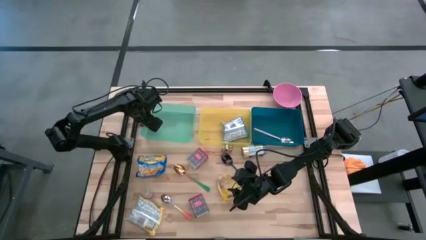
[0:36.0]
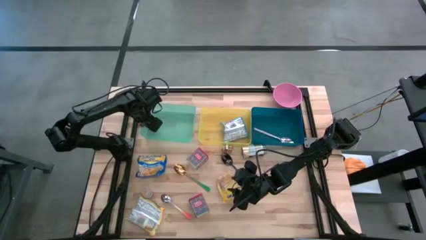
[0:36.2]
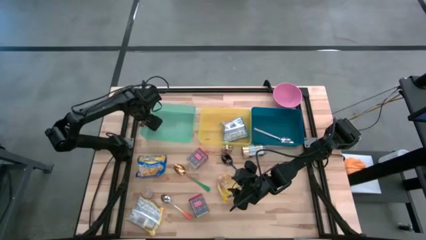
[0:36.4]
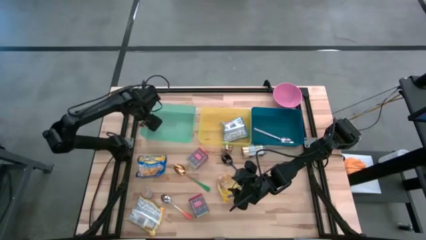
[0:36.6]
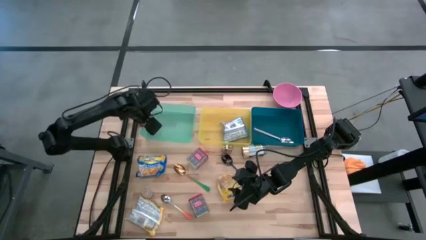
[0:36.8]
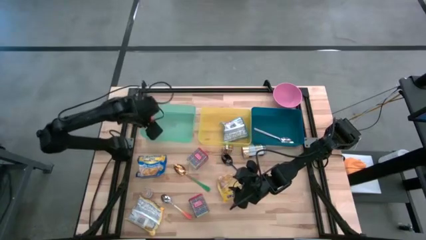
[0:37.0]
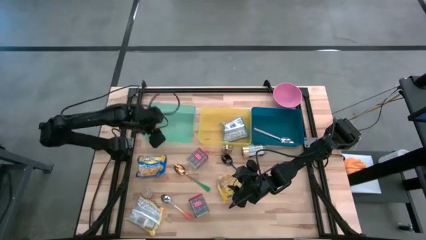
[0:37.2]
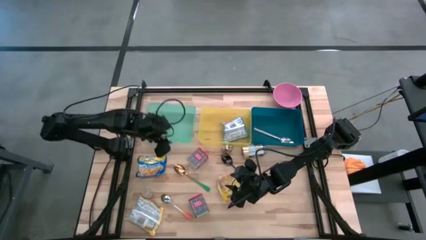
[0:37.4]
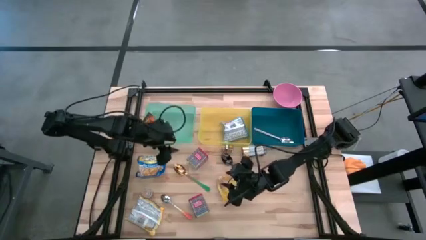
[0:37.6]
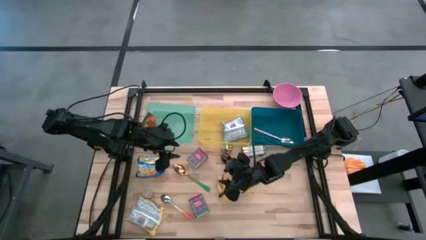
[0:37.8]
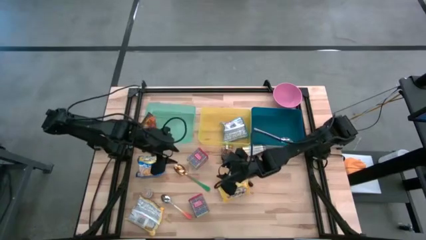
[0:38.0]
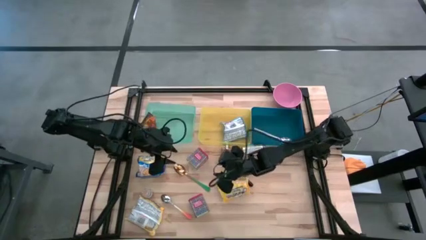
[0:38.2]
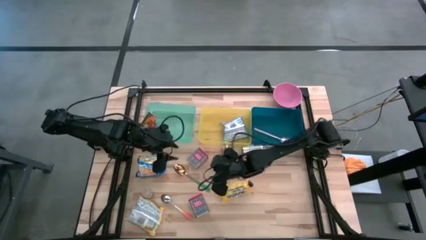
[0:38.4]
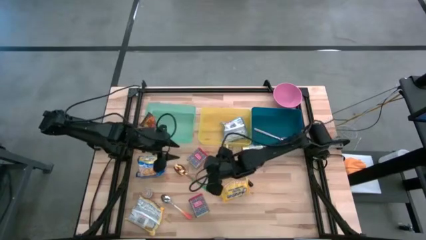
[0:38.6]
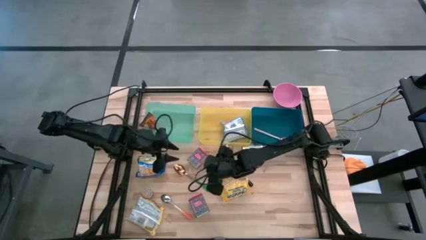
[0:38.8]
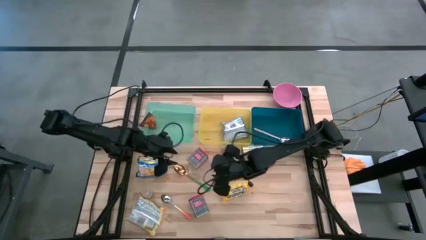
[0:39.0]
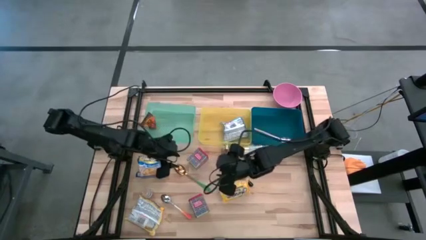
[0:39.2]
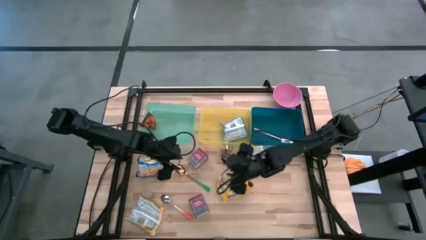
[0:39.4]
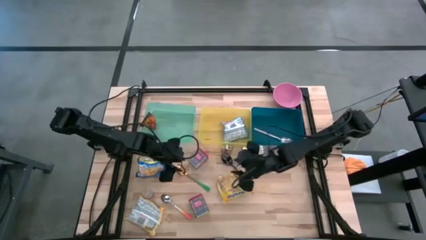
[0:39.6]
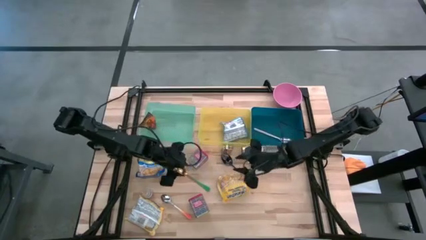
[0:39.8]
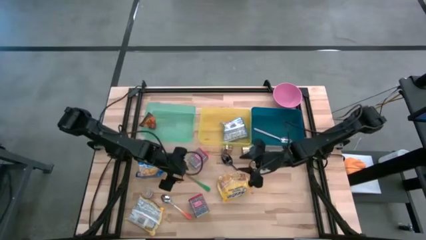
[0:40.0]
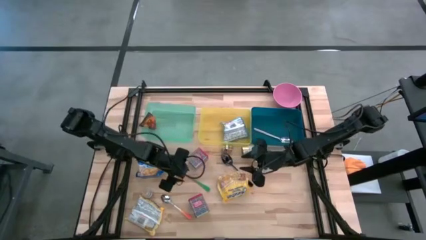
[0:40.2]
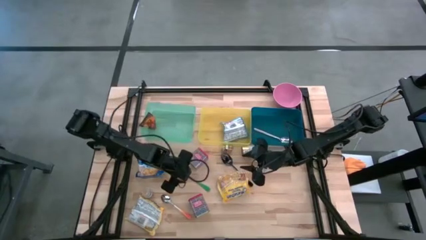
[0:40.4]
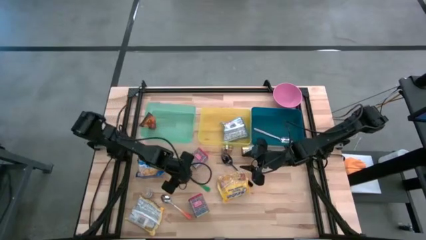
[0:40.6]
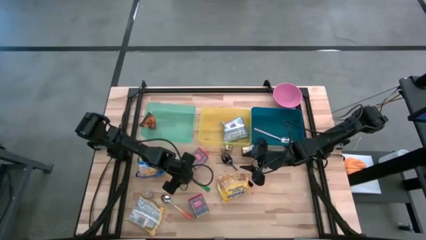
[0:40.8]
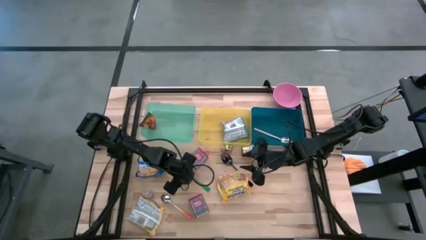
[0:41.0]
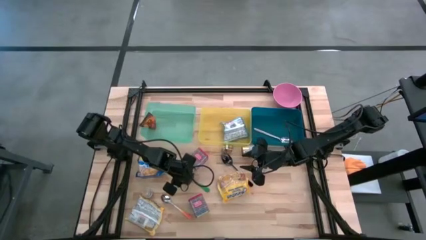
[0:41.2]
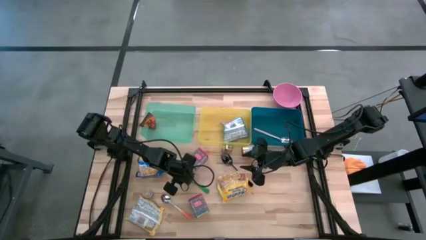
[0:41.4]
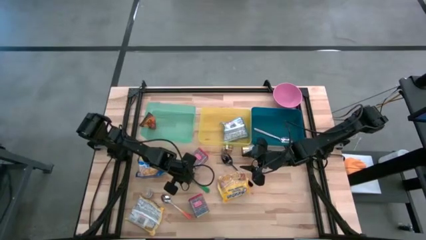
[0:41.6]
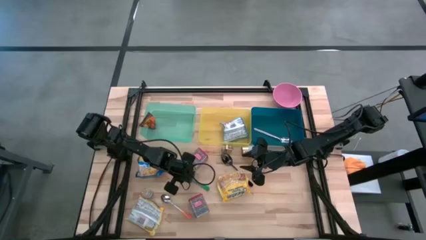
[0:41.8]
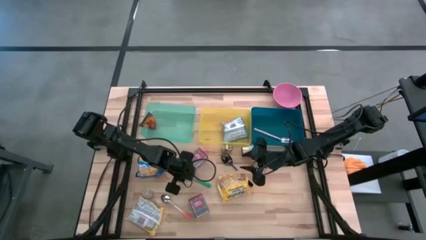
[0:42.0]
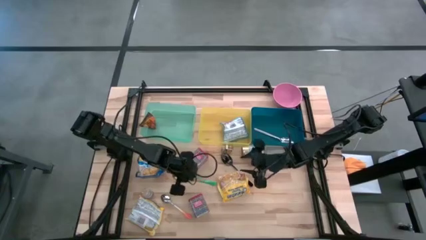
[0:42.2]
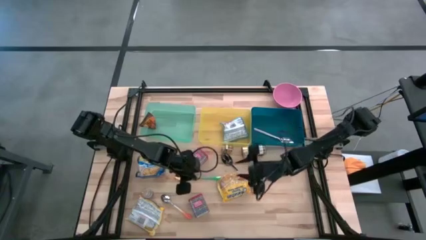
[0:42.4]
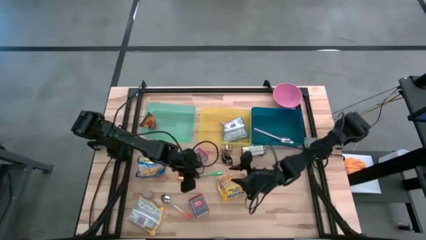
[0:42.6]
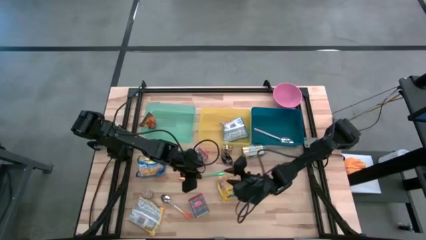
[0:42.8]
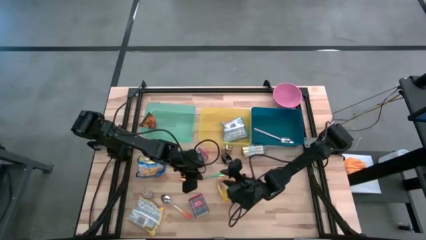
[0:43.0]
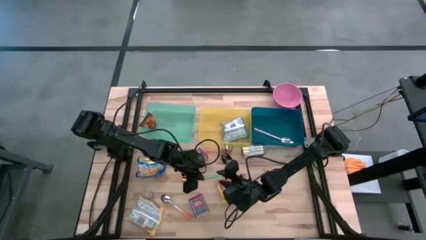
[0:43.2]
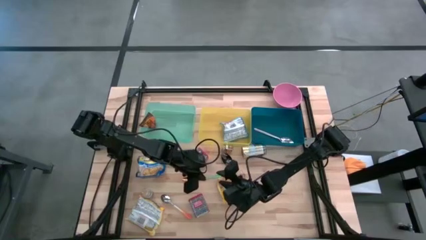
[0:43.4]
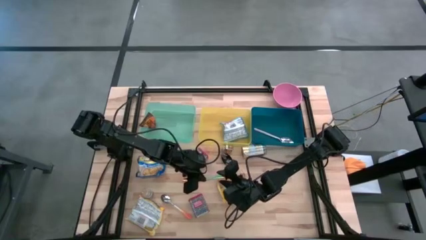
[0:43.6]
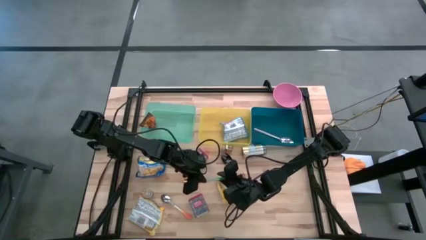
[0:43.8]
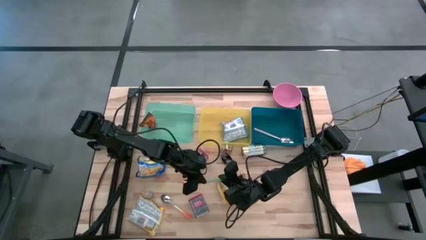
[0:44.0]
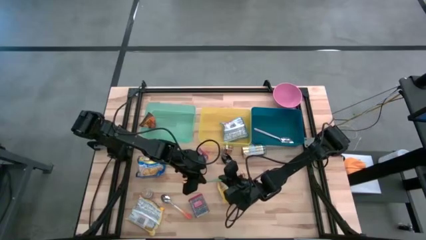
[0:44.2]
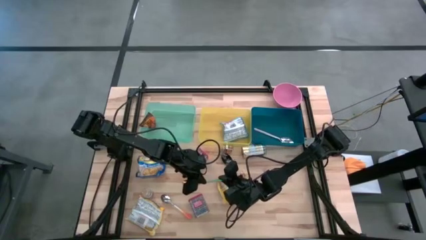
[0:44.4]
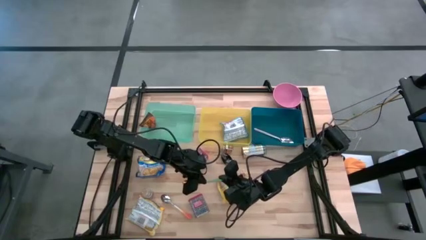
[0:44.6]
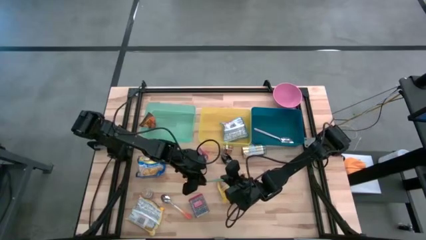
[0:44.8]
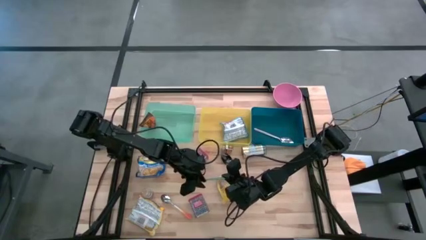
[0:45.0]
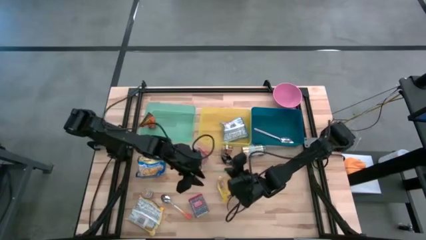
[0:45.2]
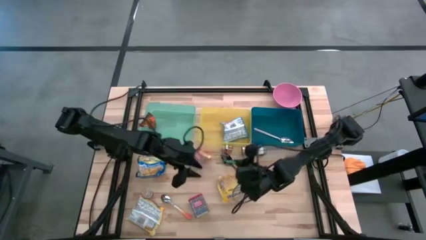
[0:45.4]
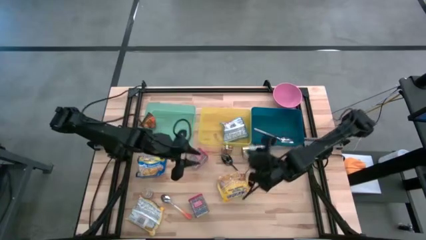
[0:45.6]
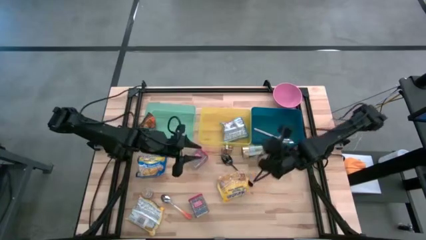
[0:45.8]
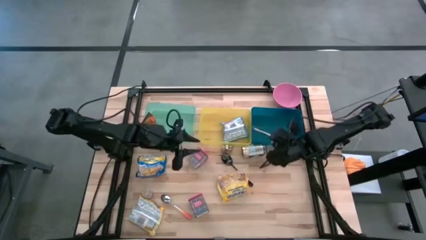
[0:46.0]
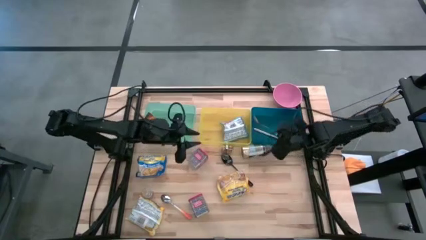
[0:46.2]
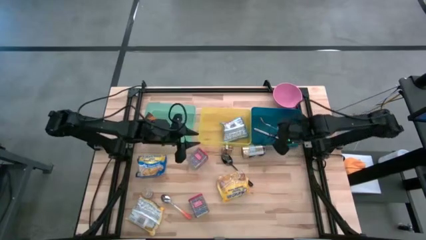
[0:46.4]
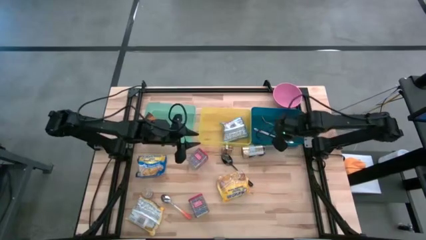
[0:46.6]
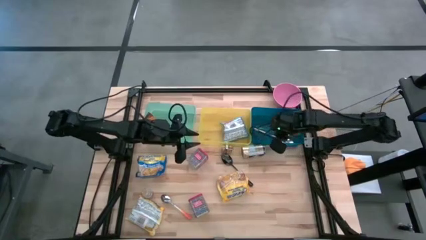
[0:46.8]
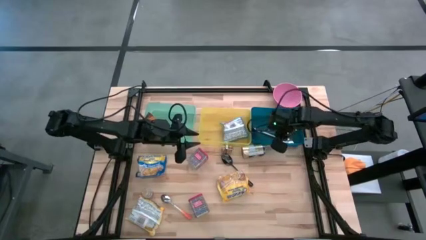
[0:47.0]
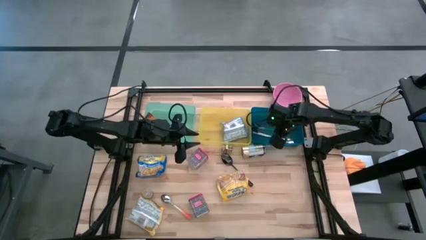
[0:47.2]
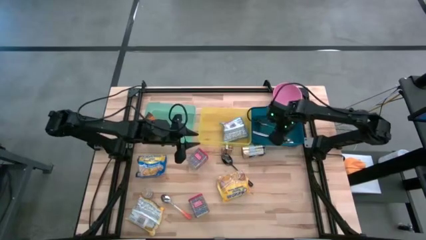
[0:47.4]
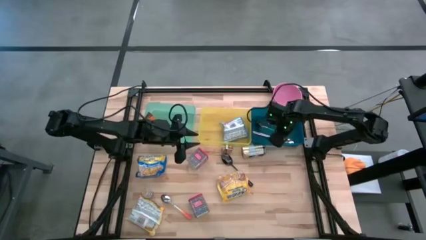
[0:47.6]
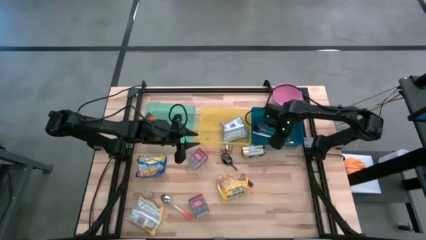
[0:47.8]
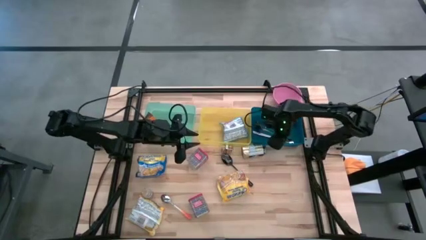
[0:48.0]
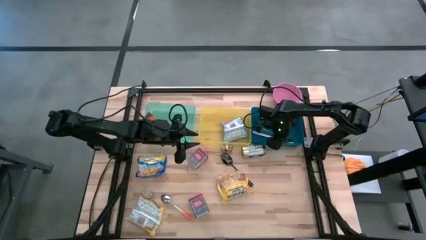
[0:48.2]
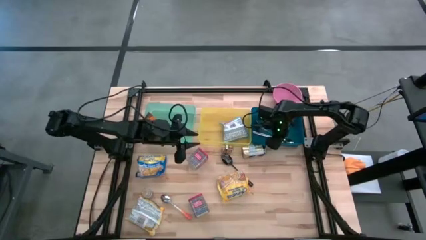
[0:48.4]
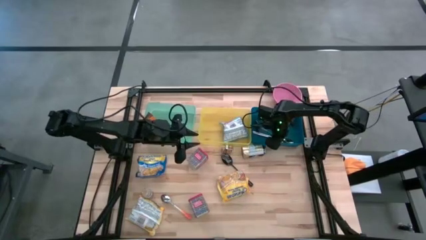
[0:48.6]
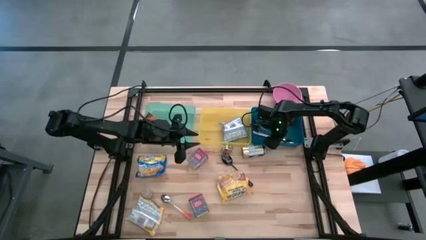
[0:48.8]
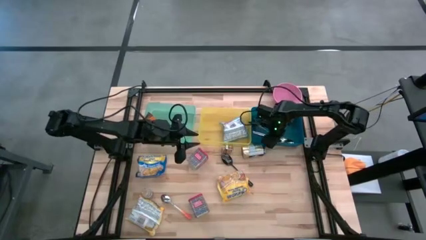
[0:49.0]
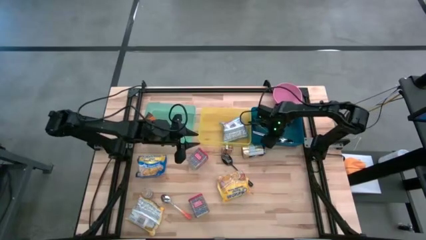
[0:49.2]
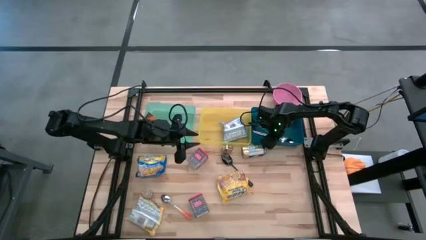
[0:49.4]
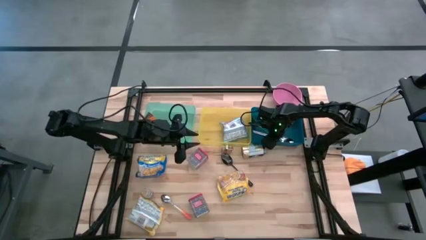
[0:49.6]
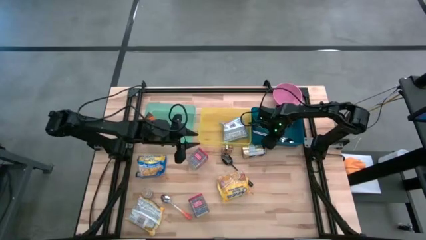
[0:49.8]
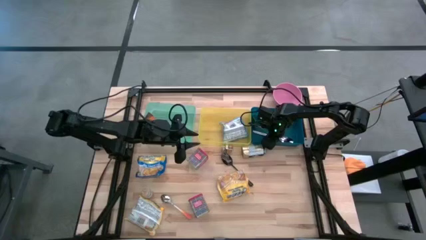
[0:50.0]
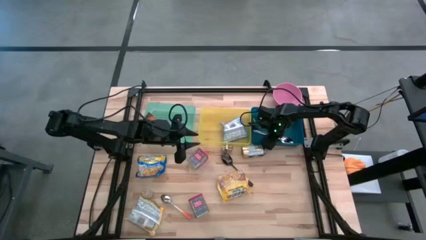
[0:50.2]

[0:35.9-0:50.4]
Put the green spoon into the blue bin
